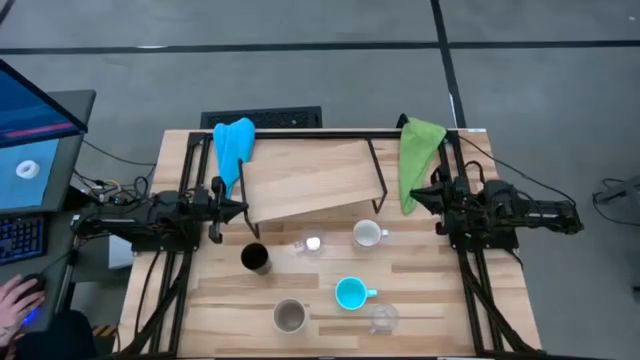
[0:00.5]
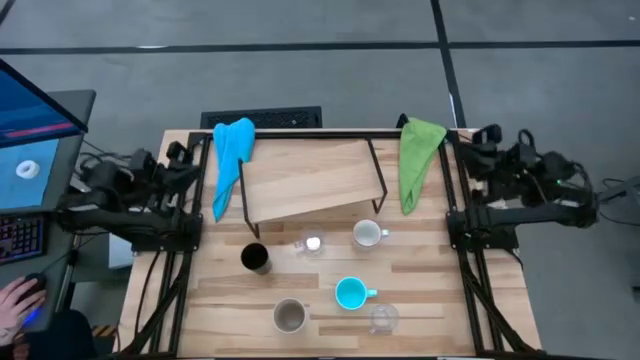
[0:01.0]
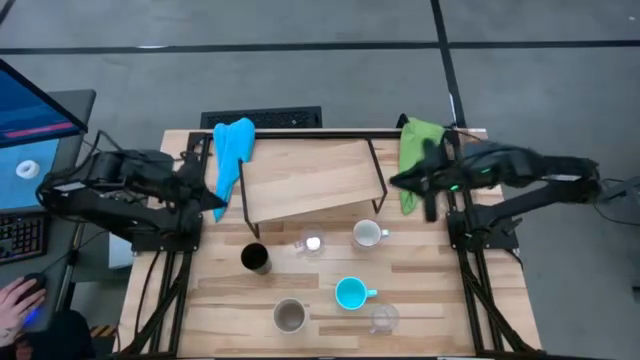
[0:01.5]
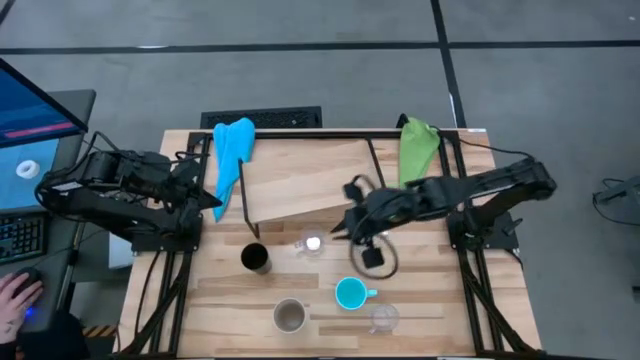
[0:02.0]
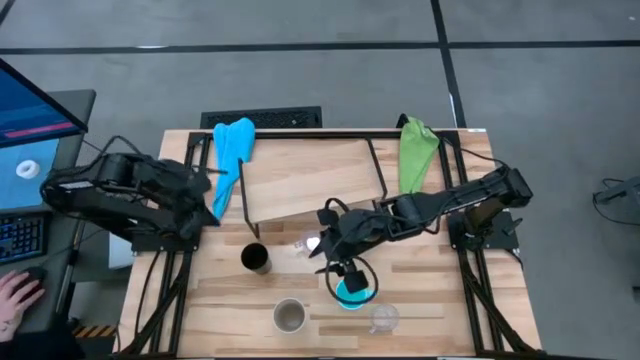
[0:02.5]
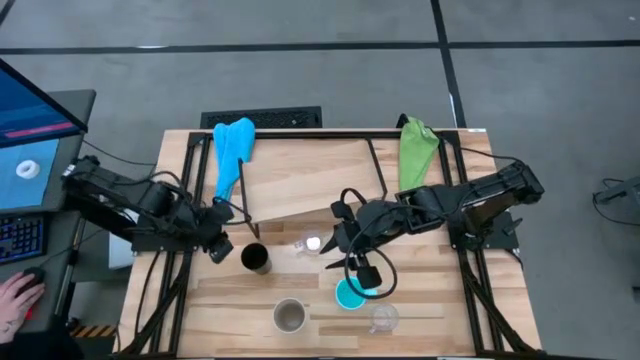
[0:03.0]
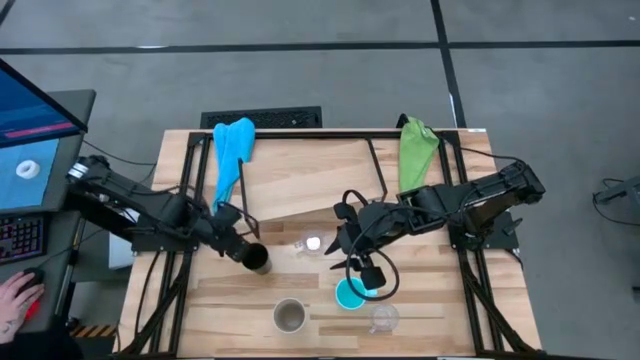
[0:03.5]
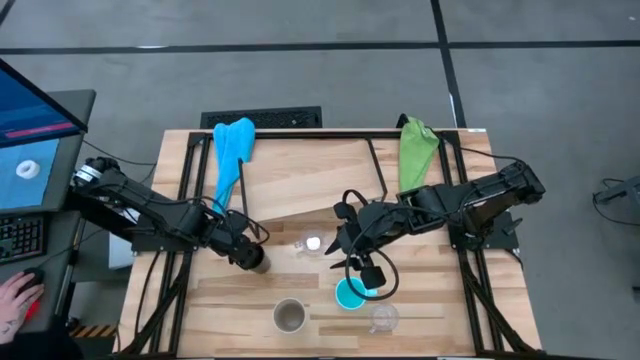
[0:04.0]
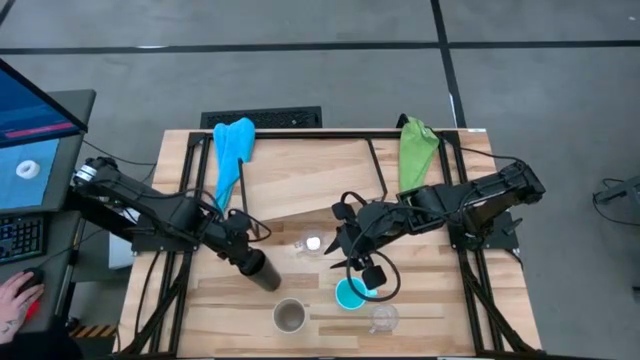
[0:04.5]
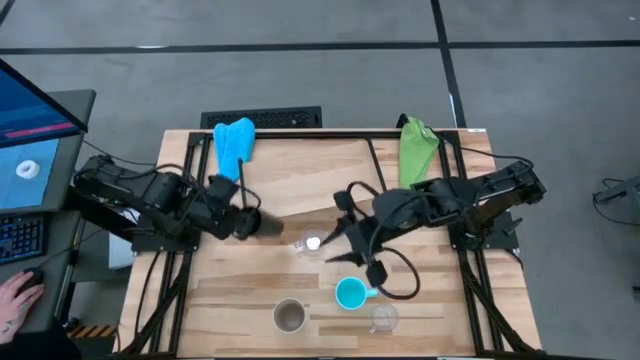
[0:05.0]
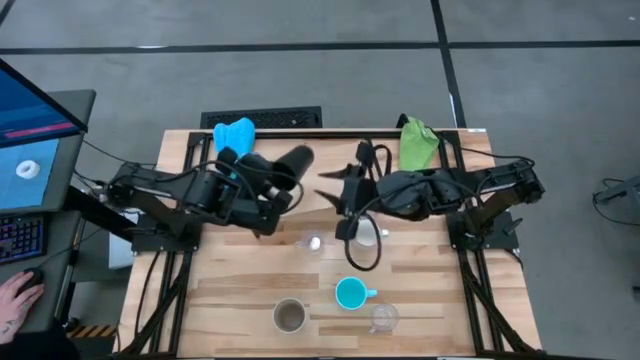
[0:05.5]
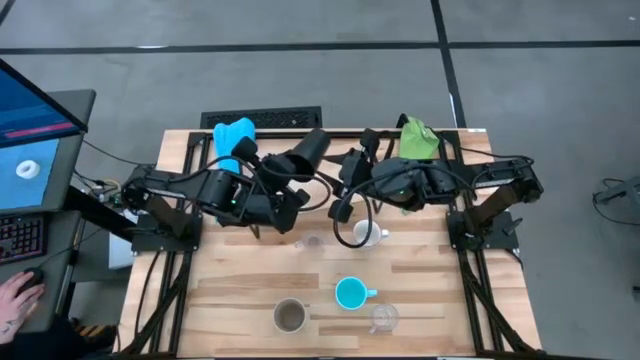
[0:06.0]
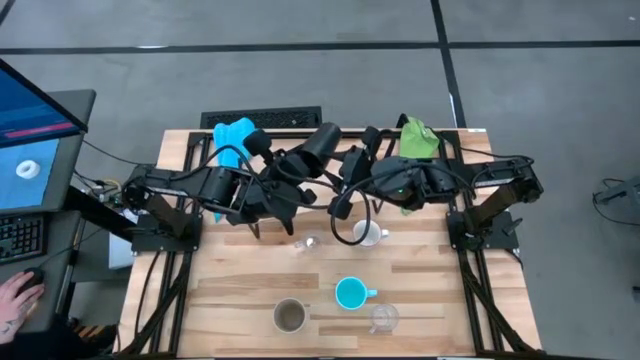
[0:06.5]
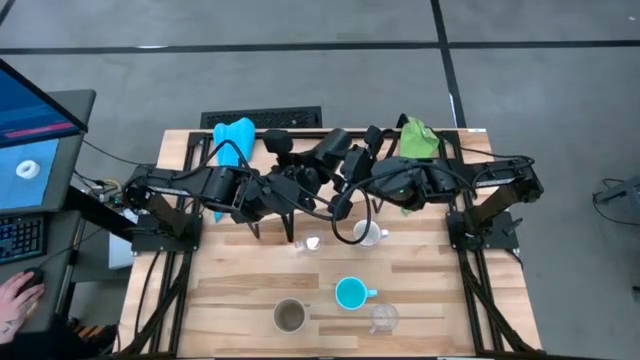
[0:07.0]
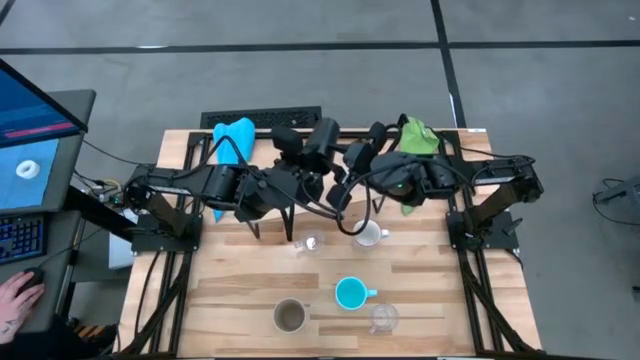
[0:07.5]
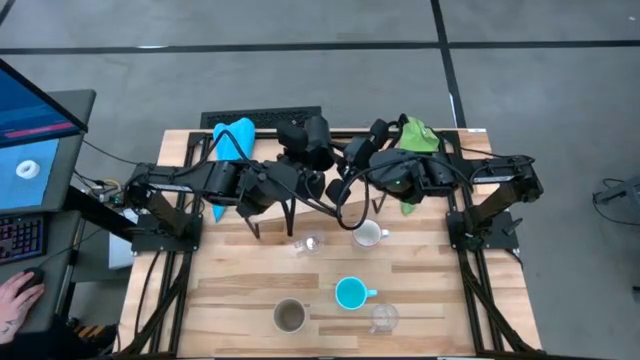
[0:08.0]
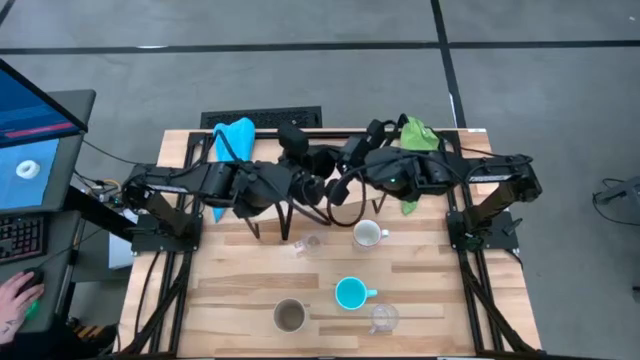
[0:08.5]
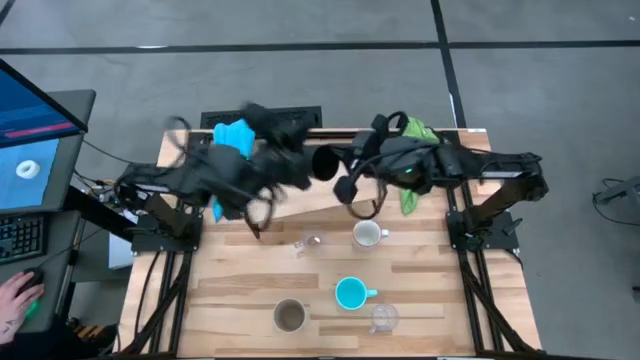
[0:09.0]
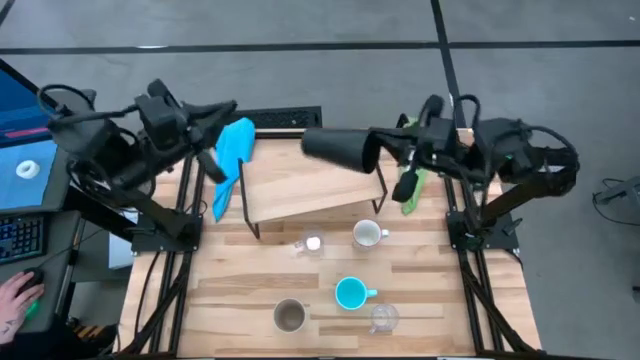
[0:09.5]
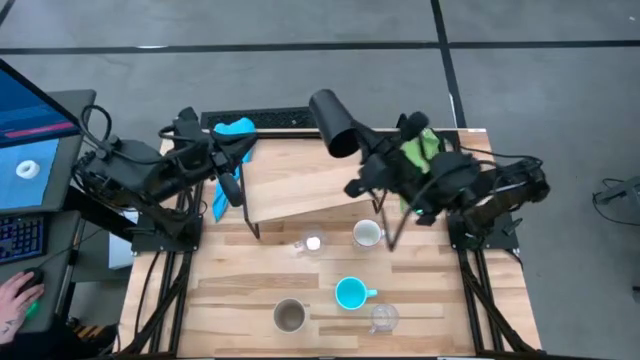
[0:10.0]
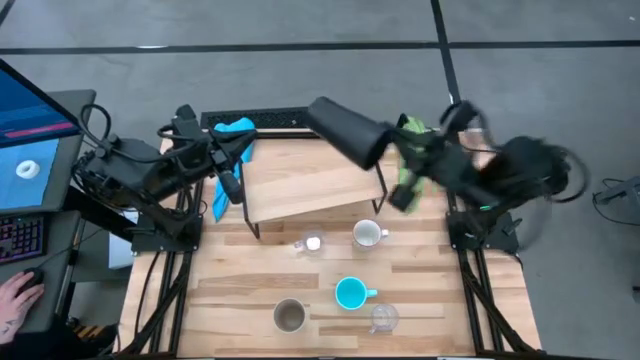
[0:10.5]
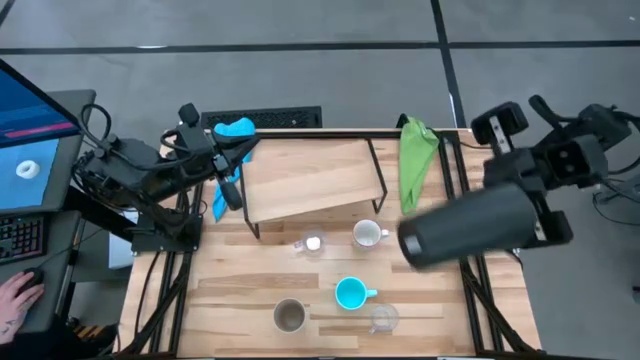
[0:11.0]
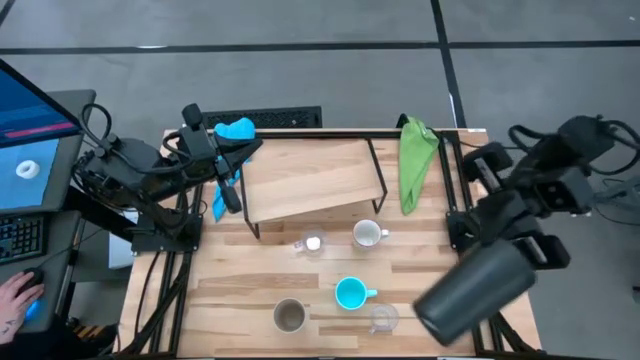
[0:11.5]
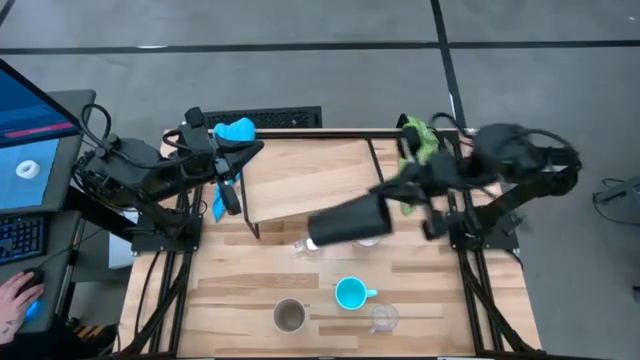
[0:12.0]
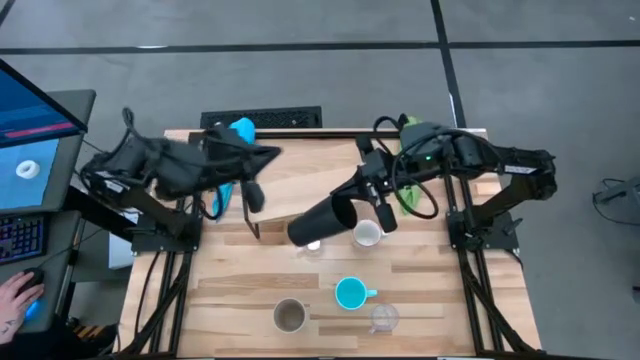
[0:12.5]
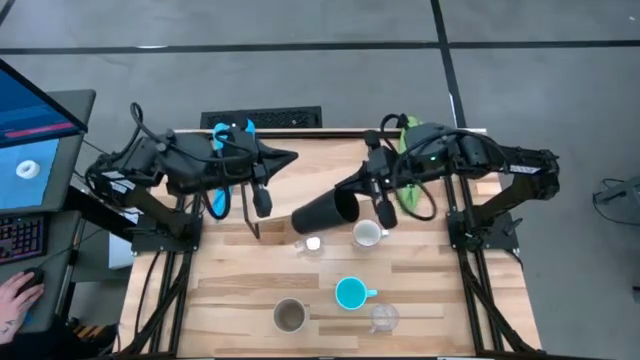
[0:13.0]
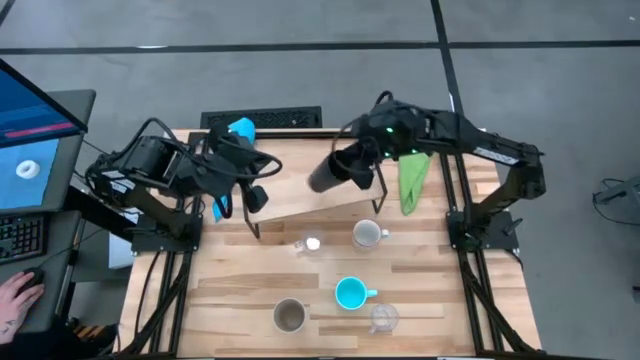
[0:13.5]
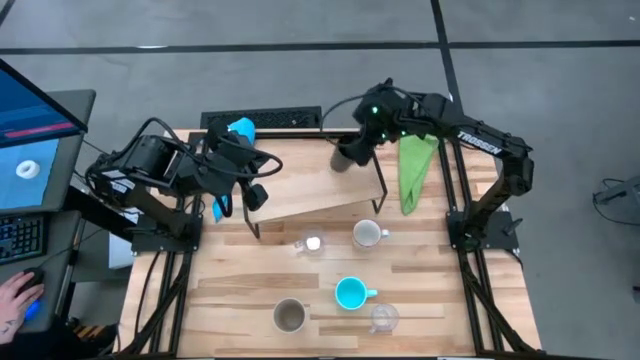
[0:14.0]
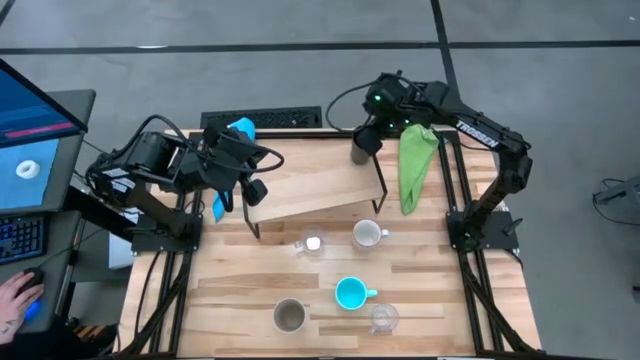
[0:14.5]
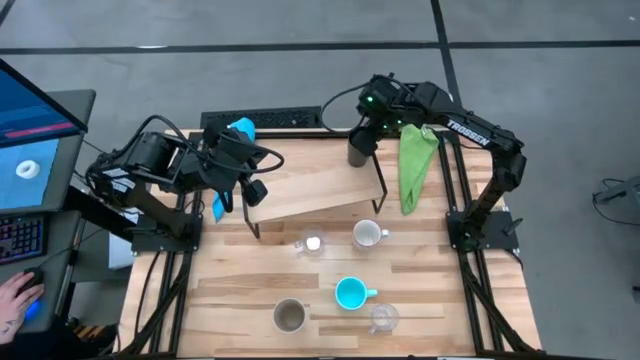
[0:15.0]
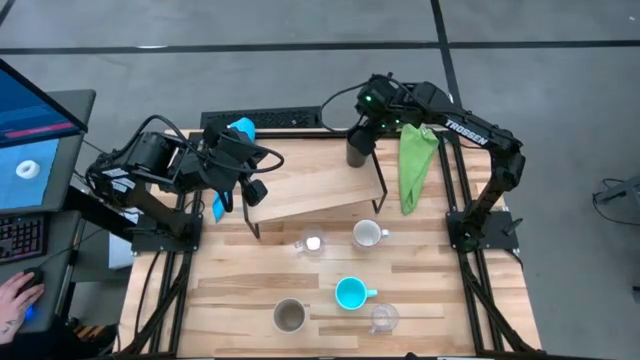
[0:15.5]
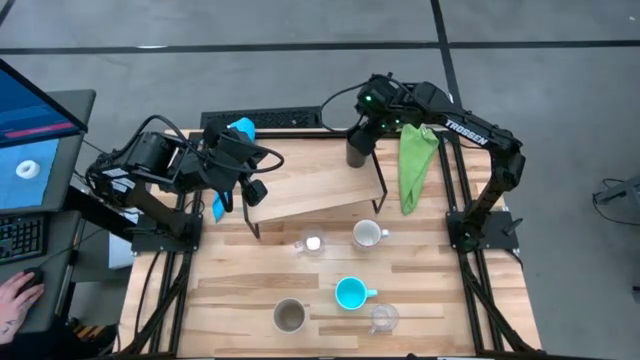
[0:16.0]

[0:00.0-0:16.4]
Task: Stack small to large cups/mugs on shelf
Put the black cup on the shelf
